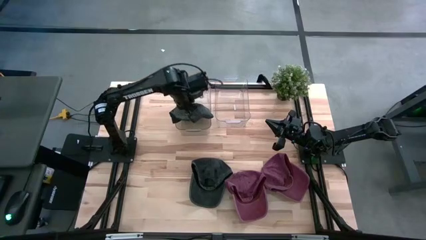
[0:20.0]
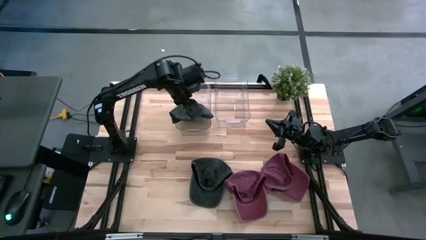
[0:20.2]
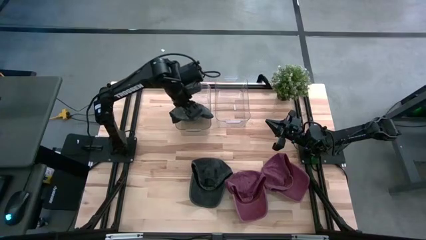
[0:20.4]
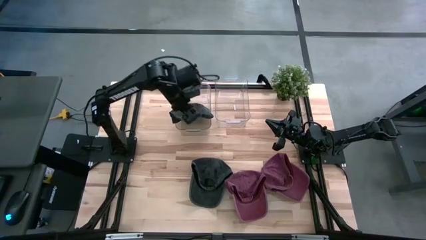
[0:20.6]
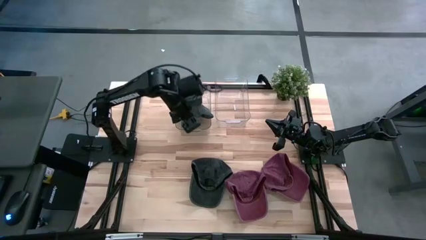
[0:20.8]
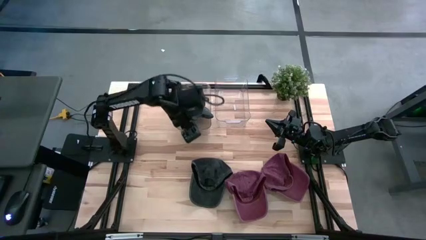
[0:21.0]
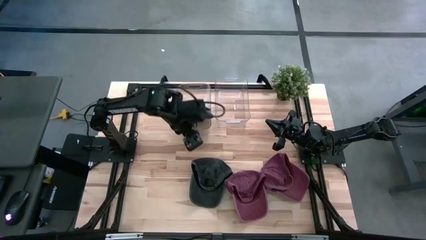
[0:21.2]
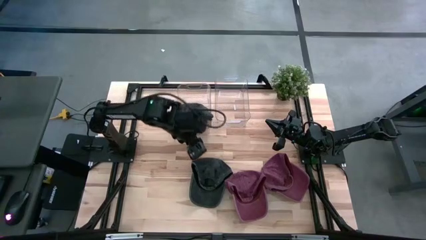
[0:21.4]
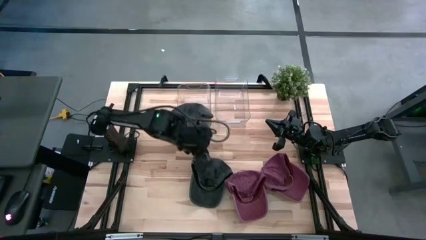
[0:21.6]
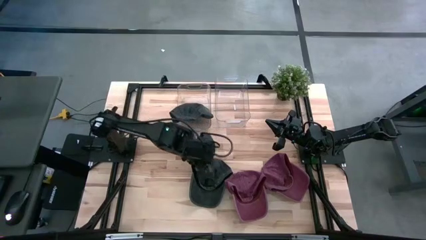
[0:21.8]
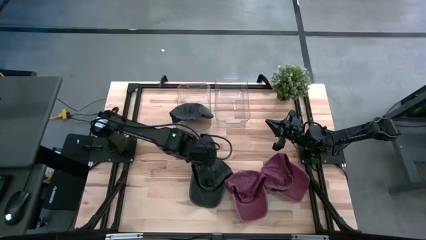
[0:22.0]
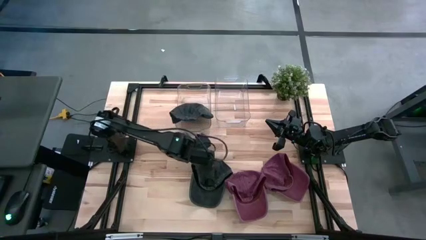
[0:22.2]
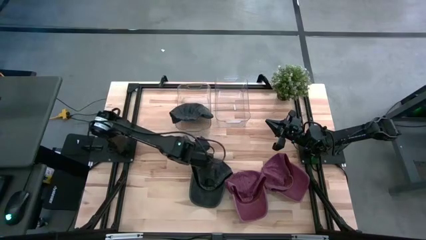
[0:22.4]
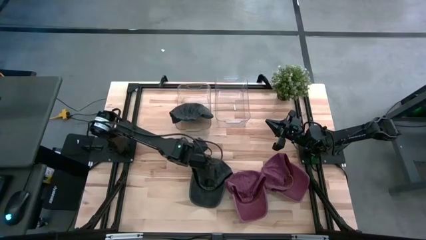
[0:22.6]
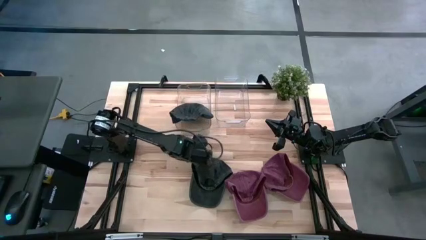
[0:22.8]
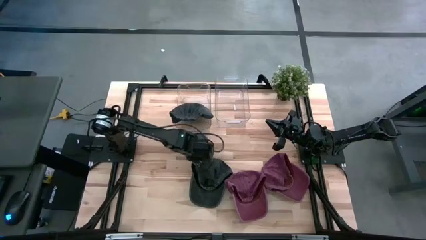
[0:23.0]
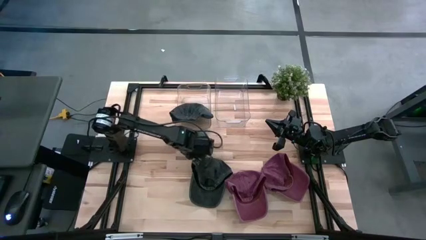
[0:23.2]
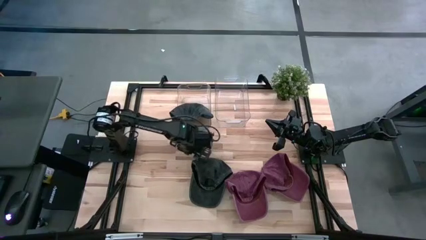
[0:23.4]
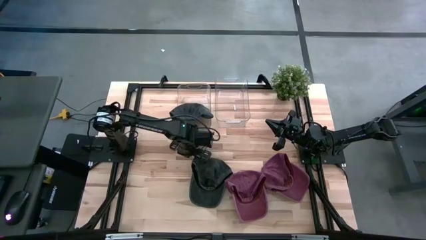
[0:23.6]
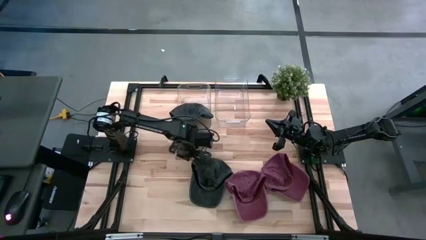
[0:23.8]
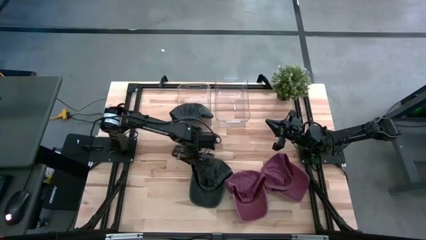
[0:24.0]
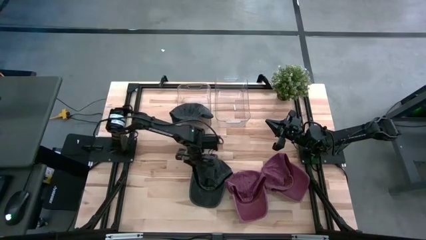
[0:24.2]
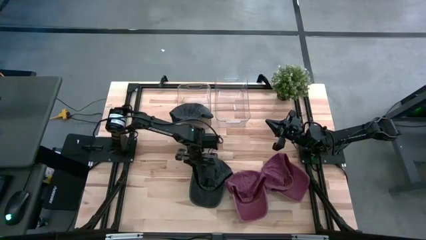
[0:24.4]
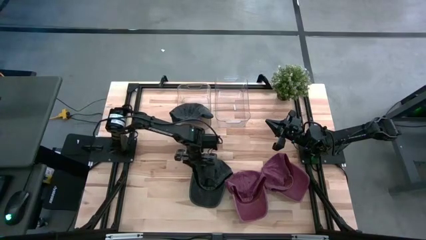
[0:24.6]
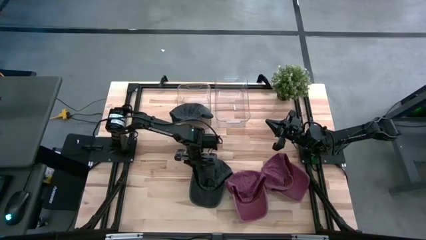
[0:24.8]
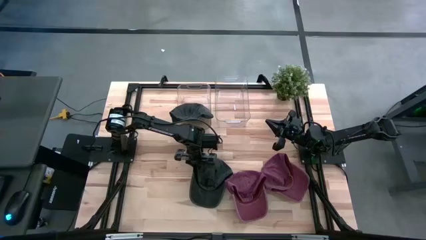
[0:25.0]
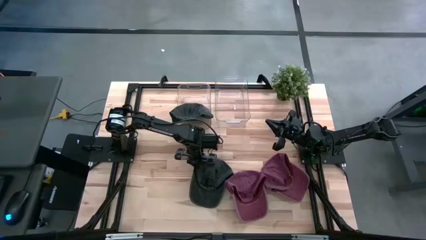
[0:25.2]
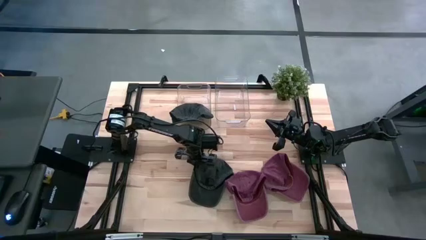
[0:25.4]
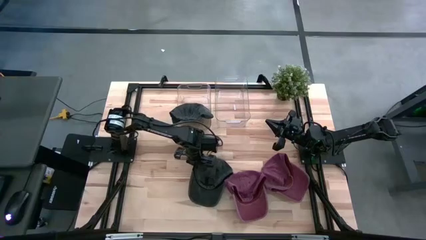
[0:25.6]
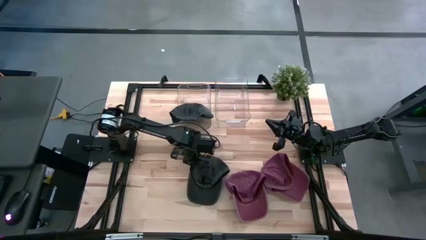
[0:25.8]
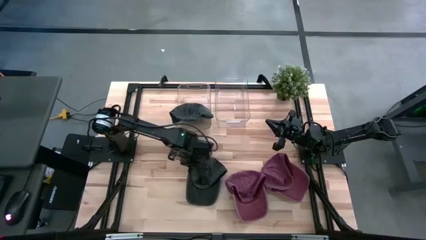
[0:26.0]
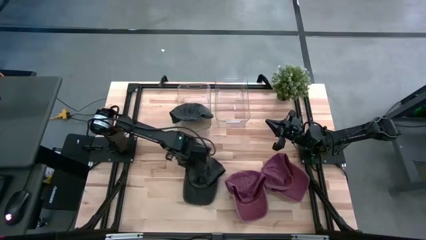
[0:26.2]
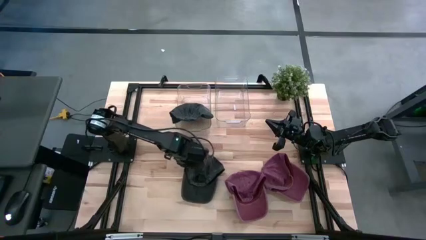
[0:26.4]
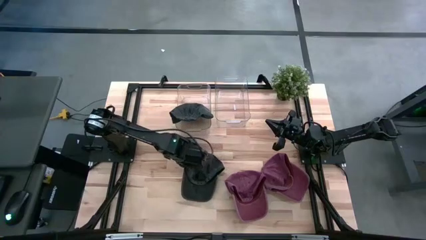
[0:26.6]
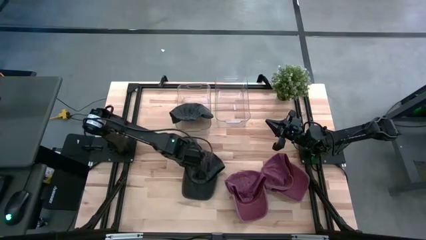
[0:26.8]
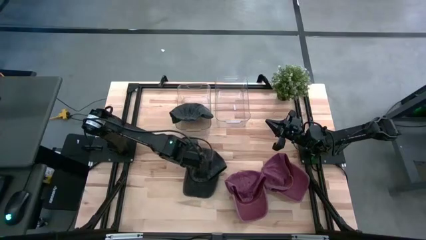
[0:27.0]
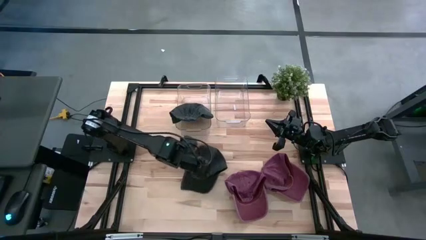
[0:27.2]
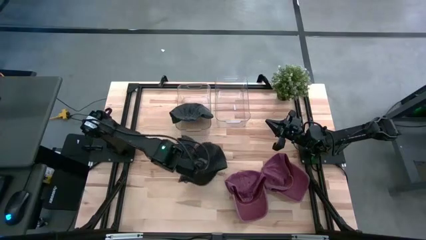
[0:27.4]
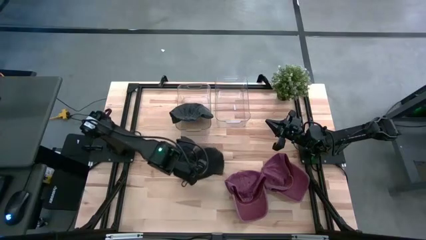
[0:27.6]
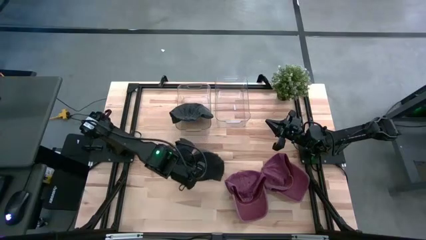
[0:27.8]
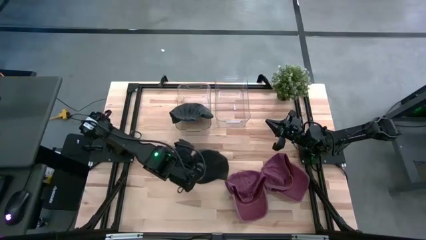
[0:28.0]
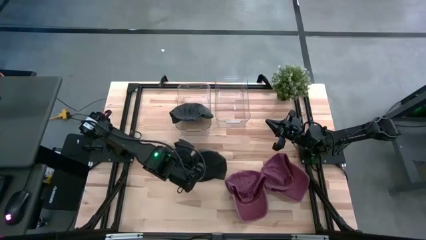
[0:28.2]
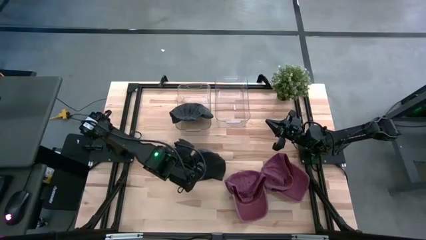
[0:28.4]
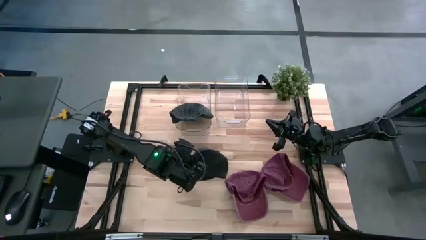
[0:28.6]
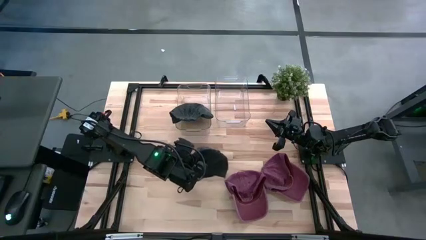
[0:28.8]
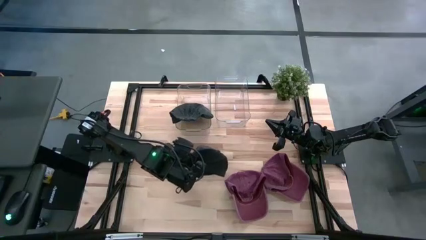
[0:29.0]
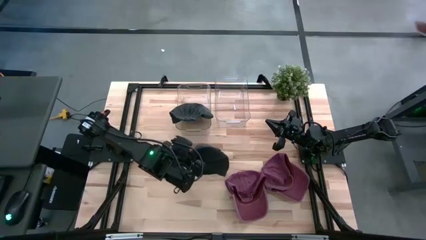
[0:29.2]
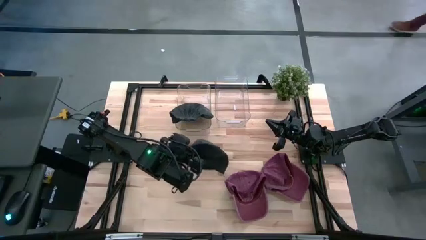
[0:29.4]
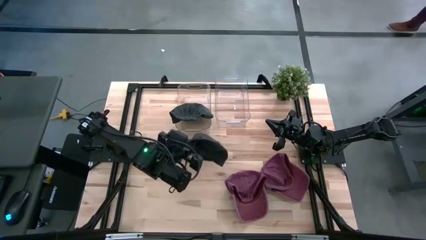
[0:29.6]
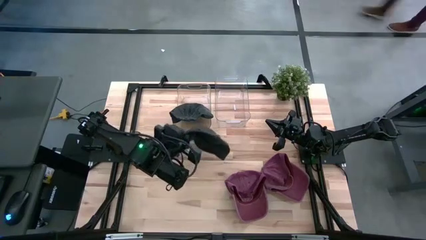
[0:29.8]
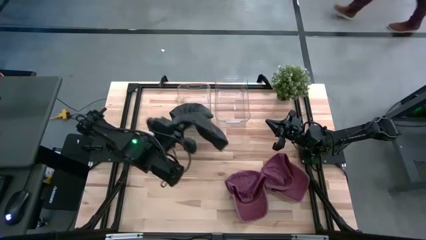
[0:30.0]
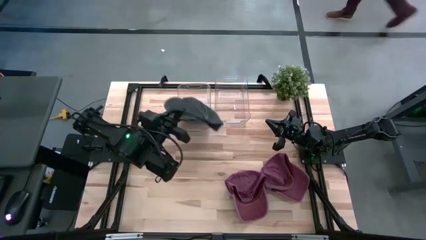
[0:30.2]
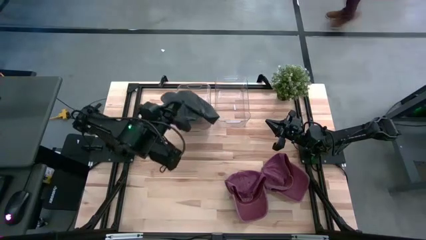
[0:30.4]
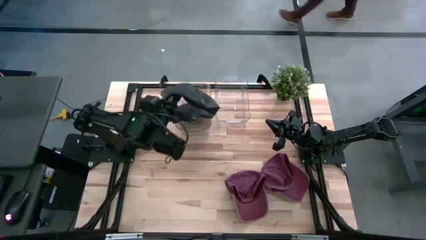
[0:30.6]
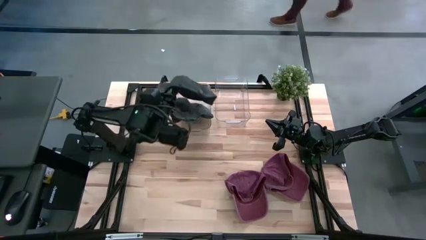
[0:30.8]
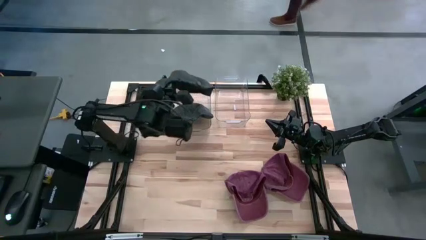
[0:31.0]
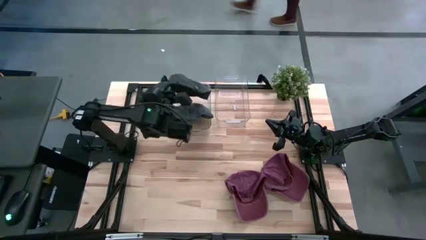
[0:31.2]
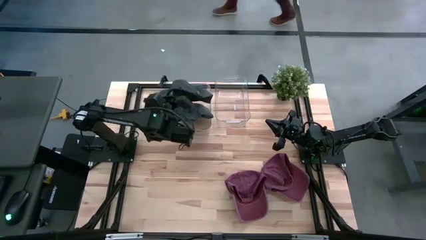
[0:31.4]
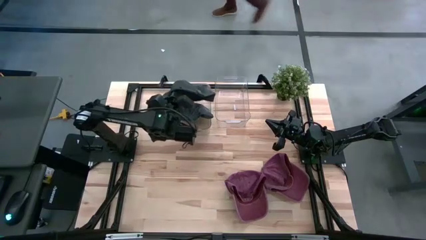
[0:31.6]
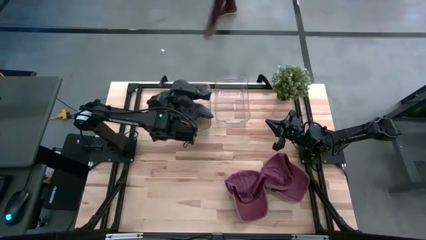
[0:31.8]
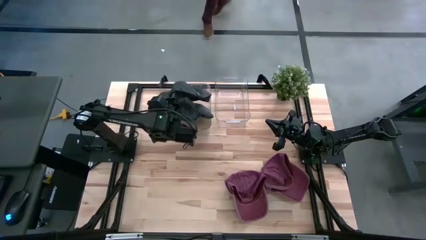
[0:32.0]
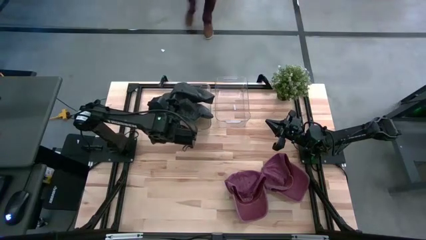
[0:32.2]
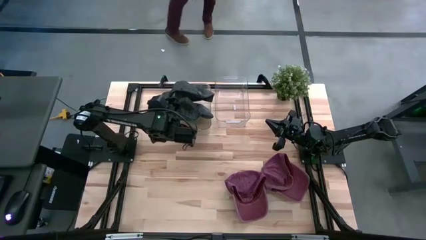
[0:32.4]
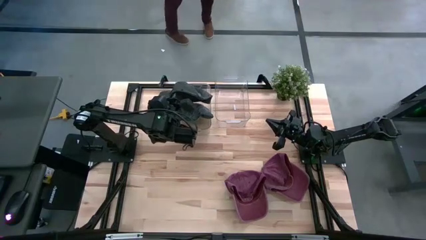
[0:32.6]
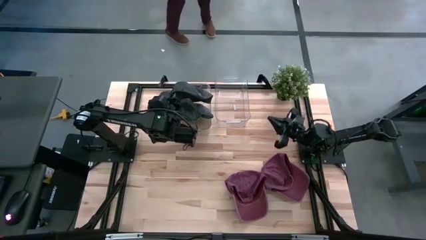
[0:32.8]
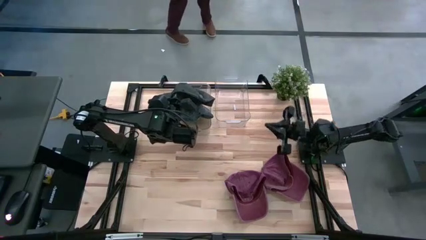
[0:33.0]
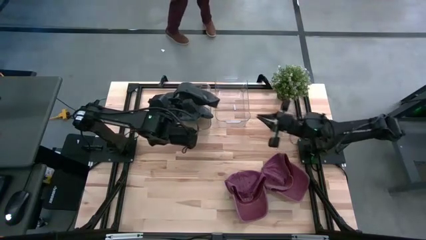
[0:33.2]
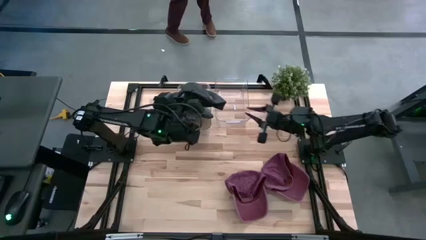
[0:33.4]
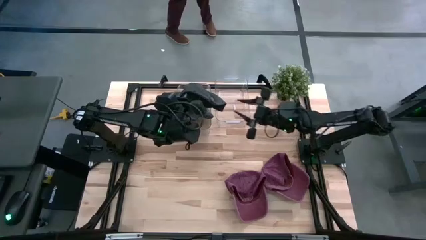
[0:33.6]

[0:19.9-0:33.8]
Task: Pick & Place hat
Put the black cap into the left transparent bin

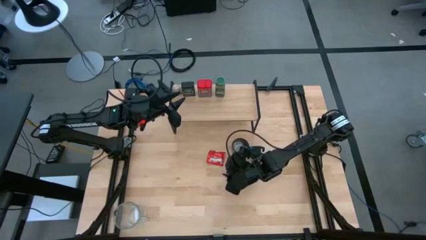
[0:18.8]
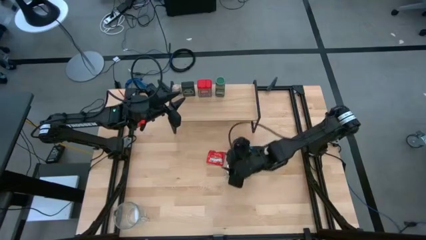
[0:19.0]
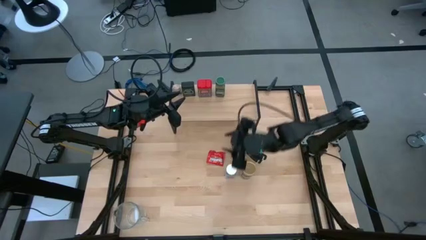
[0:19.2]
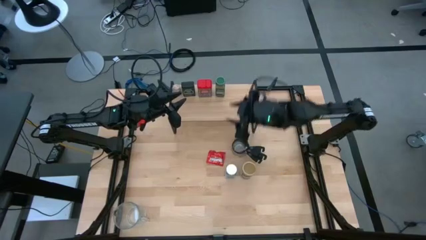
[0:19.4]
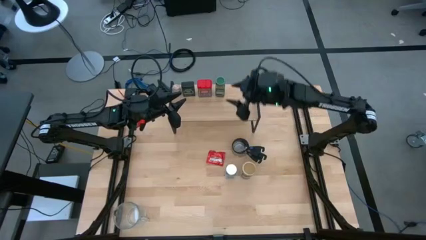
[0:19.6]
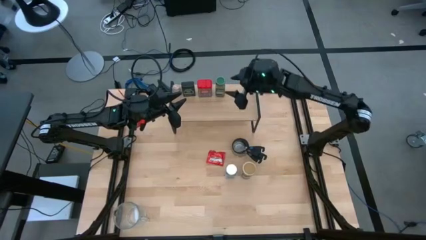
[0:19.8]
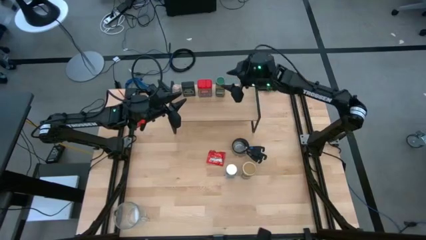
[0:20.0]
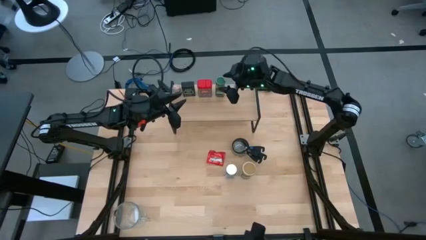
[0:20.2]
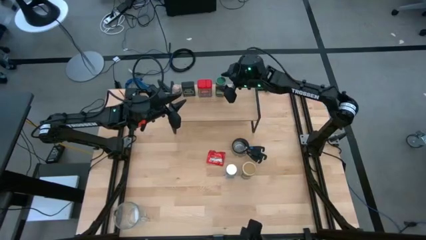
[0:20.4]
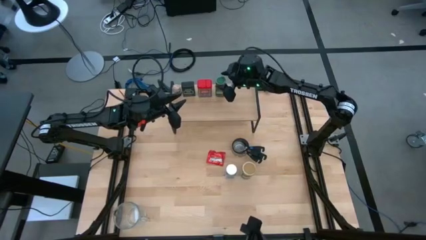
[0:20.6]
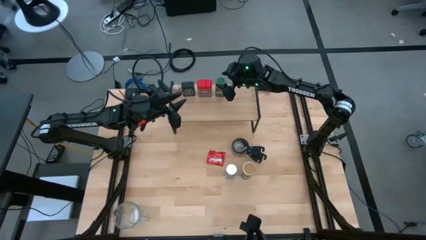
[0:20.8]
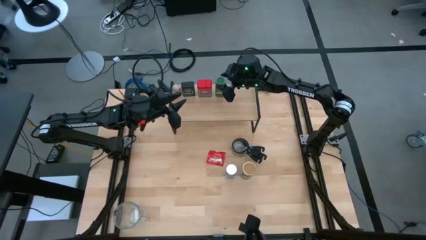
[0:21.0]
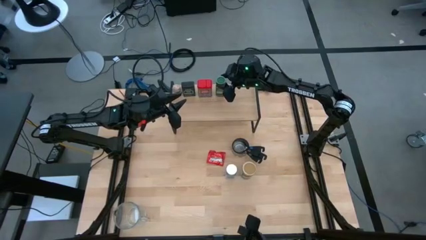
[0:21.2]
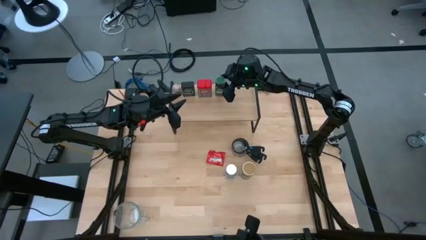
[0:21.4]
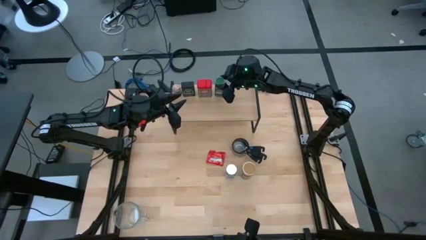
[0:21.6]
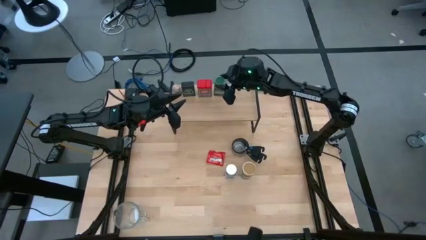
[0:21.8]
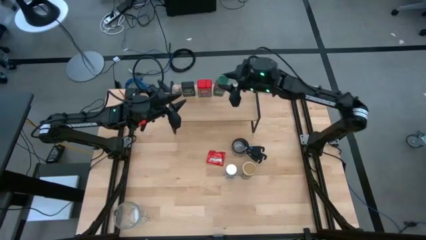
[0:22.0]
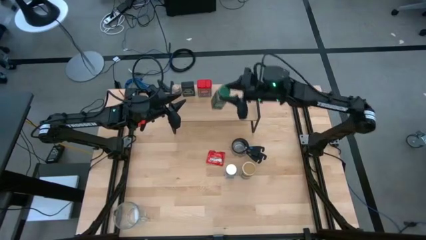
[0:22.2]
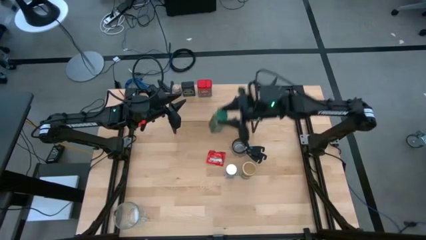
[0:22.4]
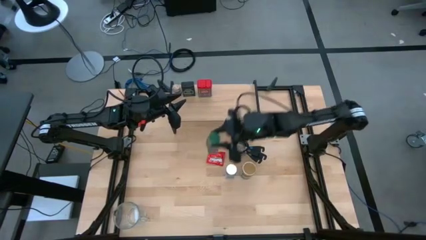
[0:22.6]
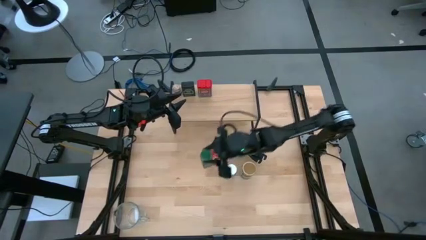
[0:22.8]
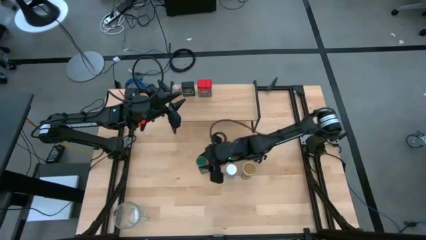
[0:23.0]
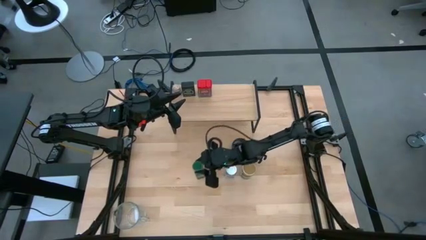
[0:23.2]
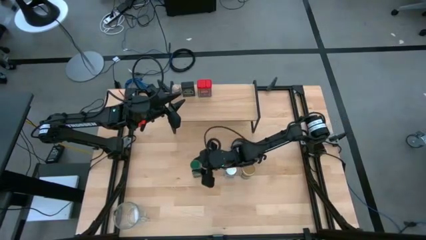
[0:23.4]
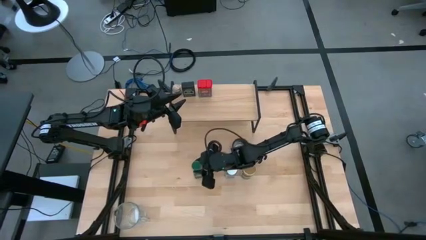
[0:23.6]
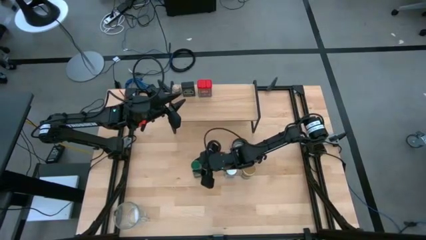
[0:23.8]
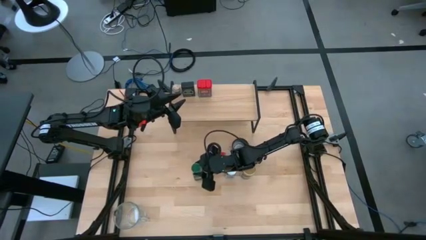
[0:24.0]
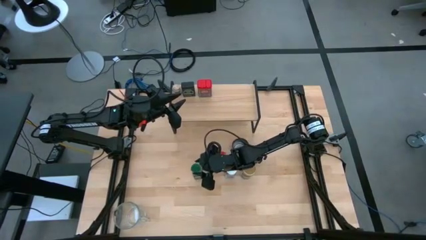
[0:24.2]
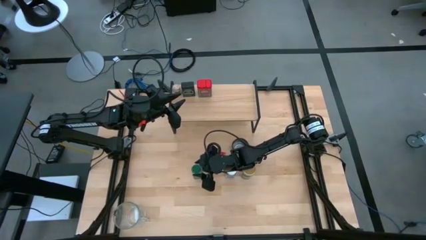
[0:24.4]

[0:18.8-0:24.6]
Task: Shelf spices
Remove the green seasoning bottle from the shelf
